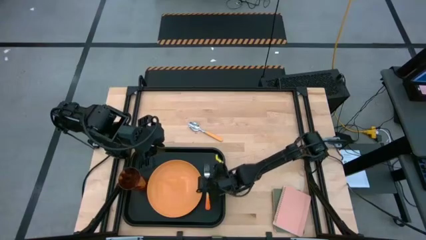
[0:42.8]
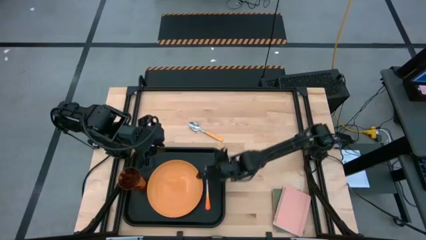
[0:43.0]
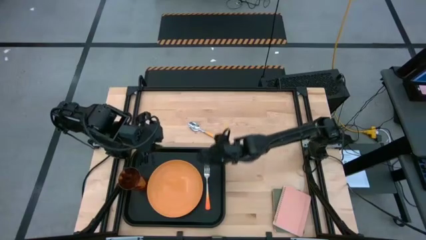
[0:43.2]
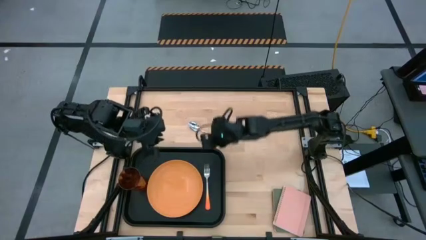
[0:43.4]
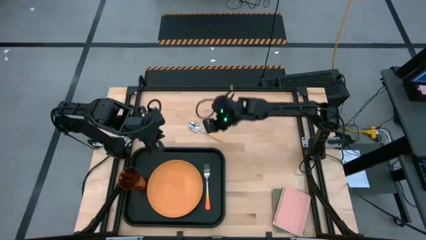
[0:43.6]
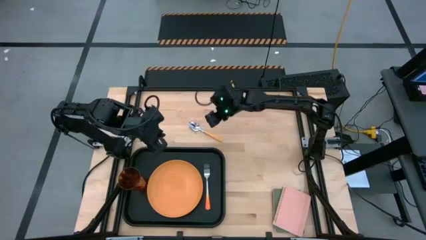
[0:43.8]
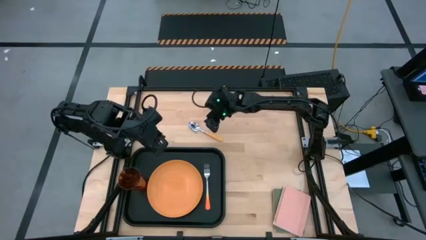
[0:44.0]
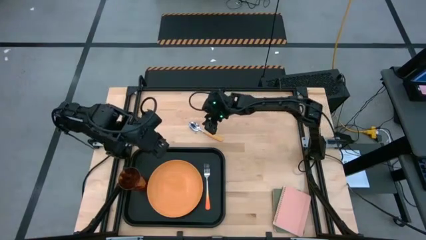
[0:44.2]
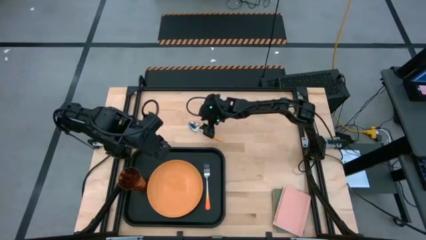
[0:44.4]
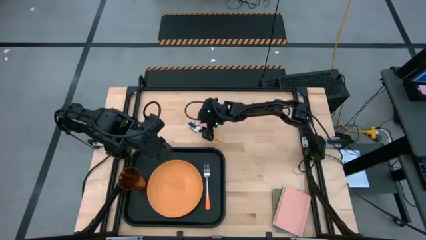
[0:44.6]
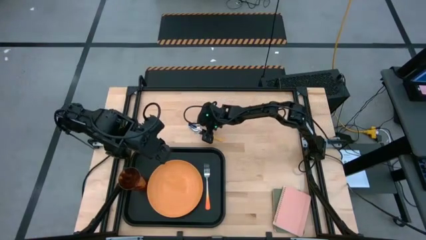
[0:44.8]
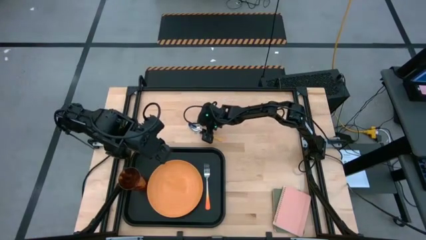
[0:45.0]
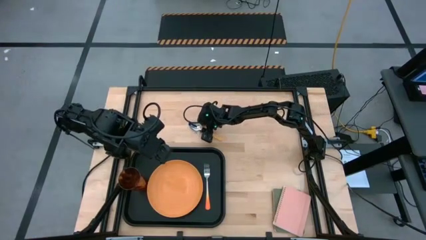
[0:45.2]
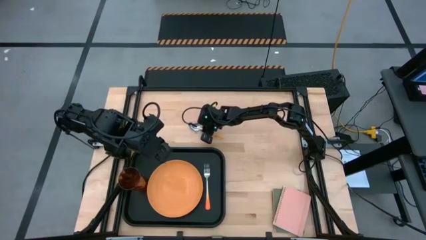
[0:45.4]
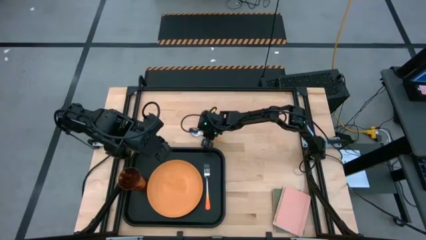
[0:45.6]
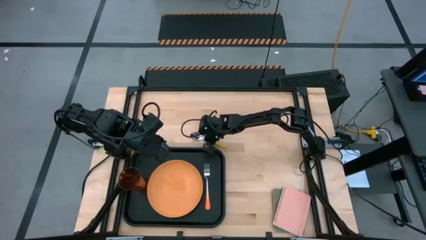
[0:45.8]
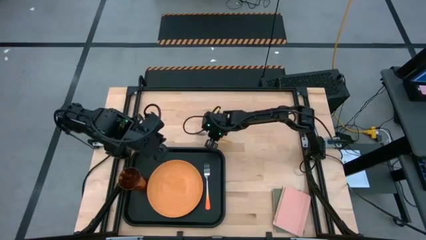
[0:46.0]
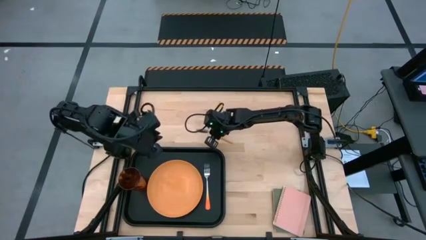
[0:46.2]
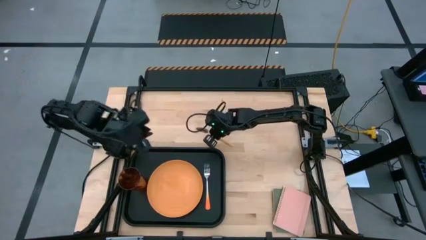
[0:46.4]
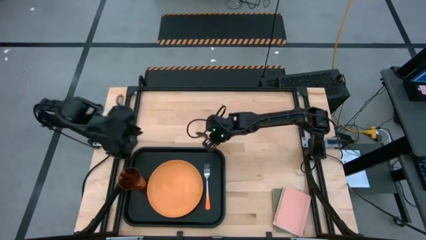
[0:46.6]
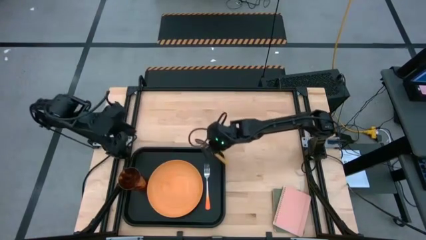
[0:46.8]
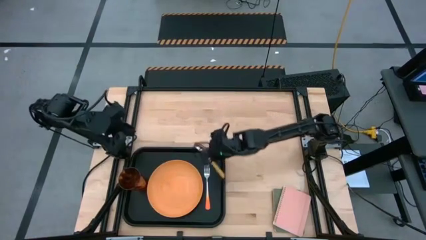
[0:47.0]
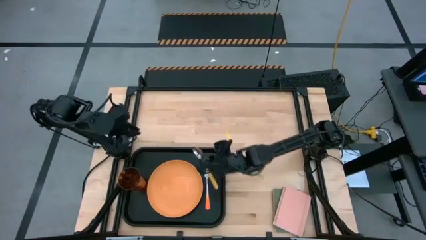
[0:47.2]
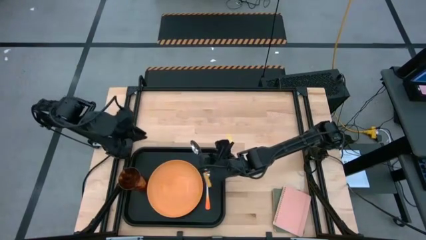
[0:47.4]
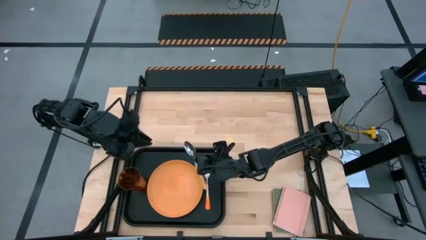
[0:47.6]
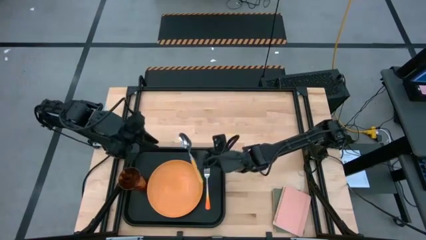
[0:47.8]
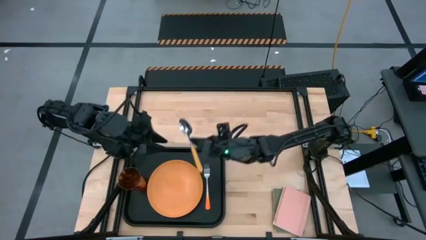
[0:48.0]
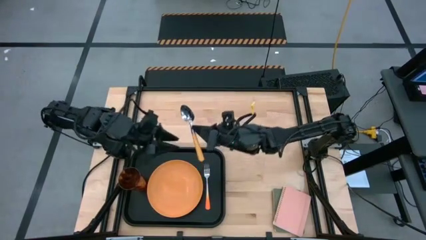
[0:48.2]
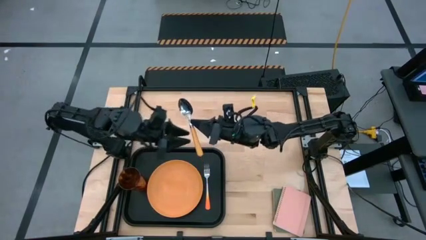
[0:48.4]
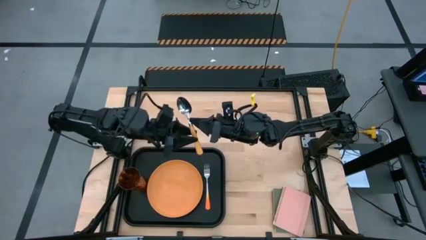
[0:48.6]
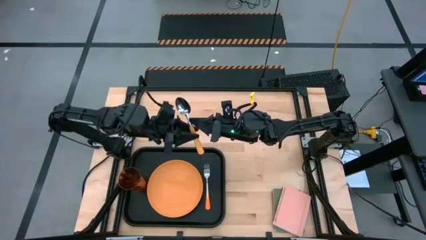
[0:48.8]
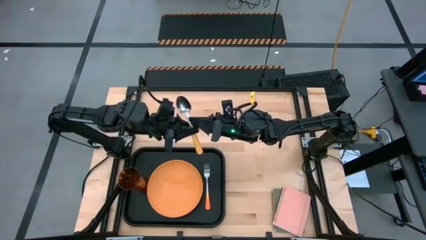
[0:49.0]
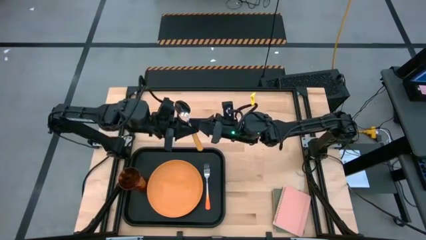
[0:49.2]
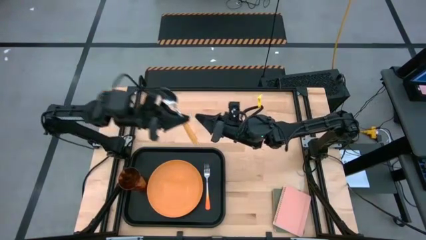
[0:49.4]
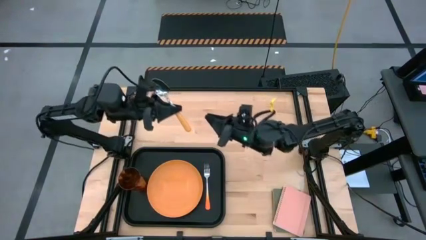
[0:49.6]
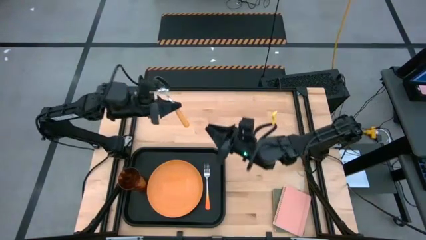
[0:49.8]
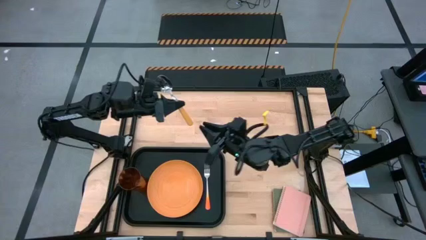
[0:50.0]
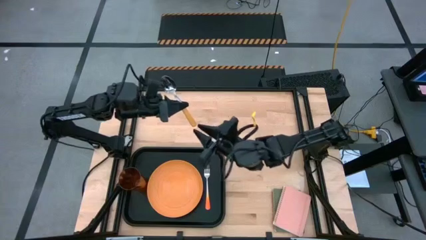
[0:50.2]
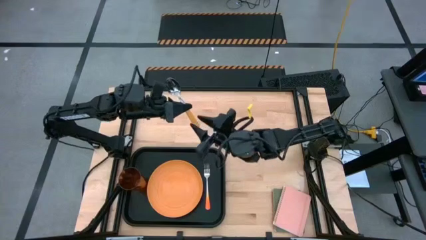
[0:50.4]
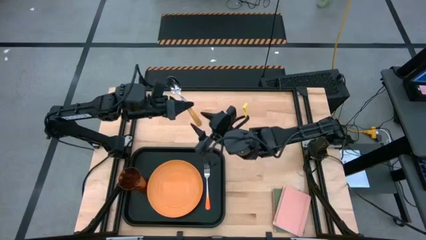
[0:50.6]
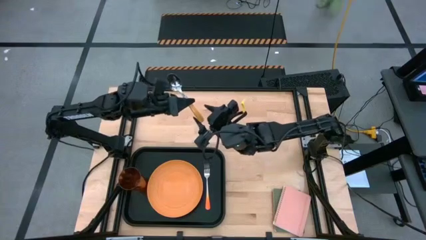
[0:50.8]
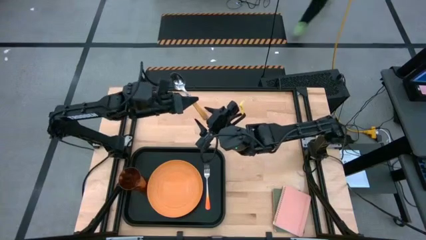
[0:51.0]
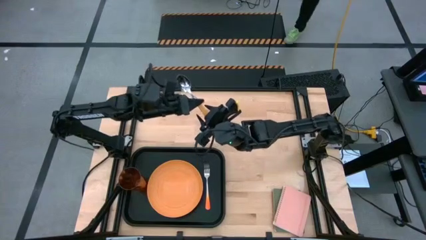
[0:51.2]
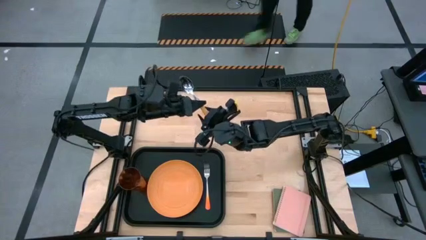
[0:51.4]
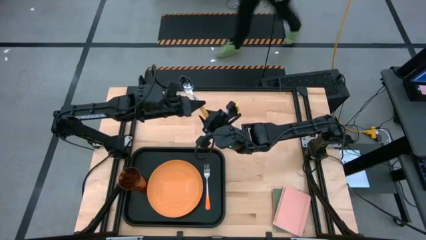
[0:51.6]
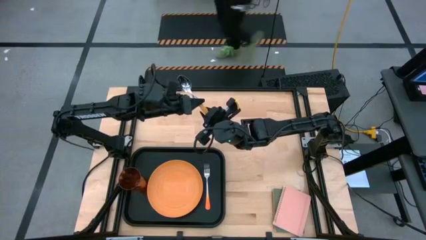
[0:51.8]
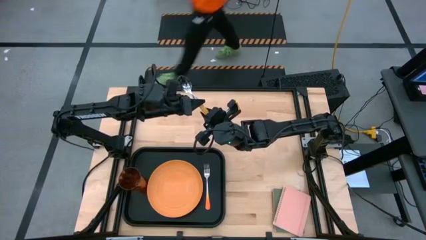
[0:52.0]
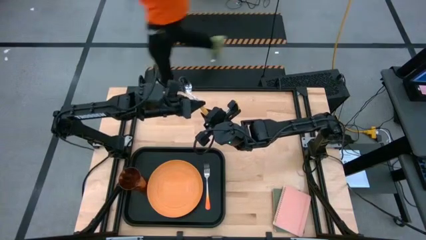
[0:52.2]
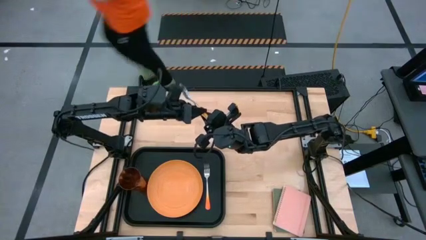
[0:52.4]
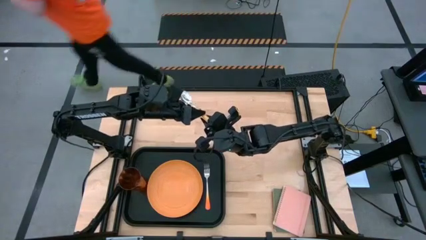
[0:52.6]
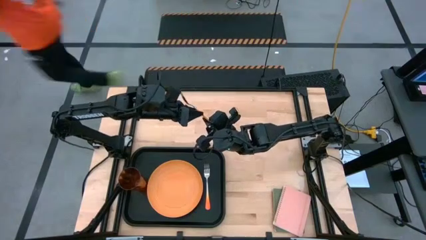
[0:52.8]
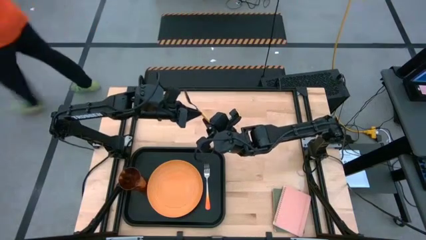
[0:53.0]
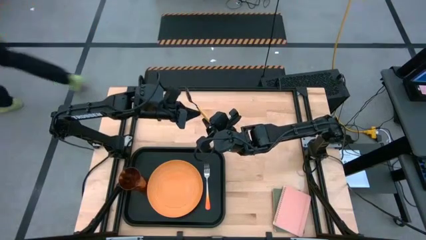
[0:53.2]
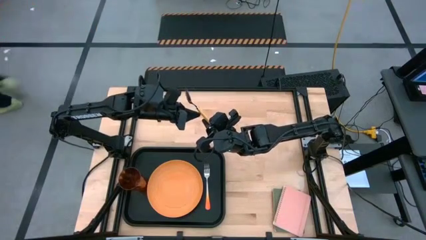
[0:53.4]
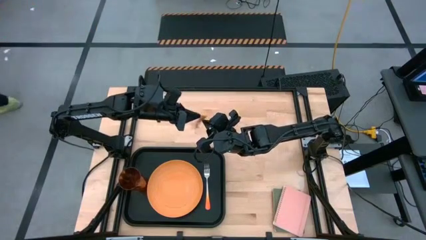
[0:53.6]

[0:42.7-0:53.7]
Task: Pick and place plate/cup/fork/spoon on tray
Put the orange fork on the black tray to the right of the orange fork
